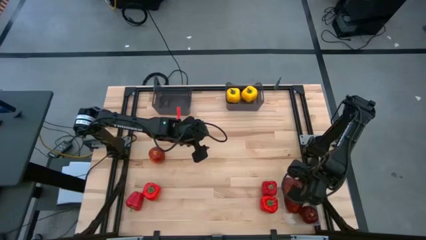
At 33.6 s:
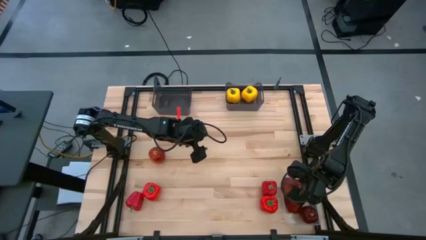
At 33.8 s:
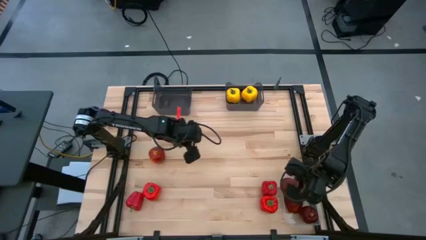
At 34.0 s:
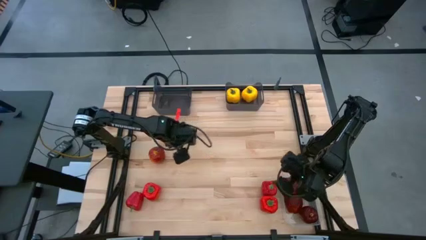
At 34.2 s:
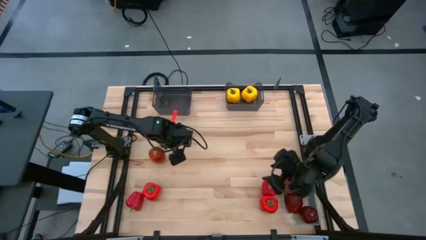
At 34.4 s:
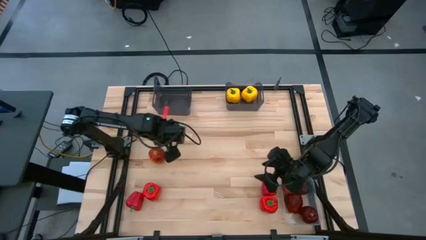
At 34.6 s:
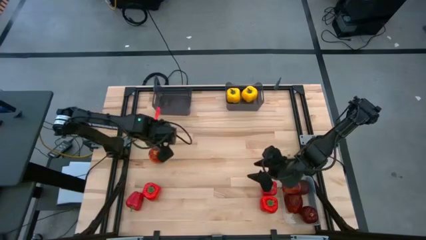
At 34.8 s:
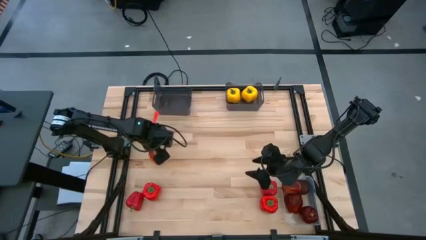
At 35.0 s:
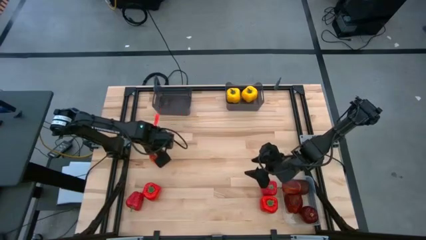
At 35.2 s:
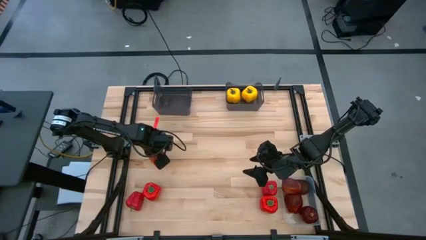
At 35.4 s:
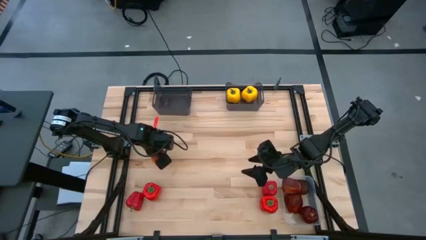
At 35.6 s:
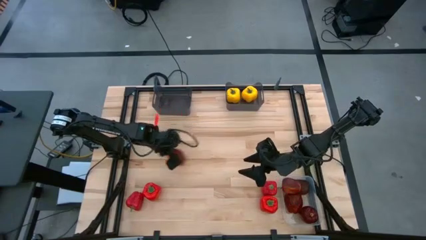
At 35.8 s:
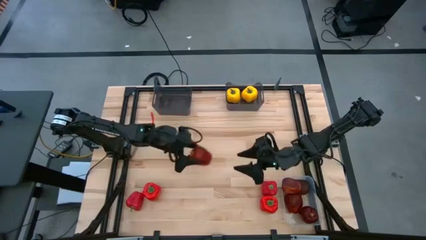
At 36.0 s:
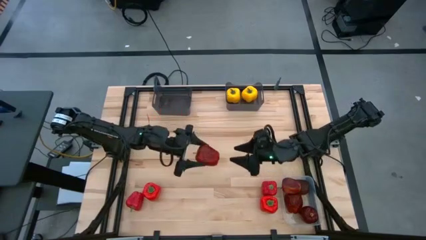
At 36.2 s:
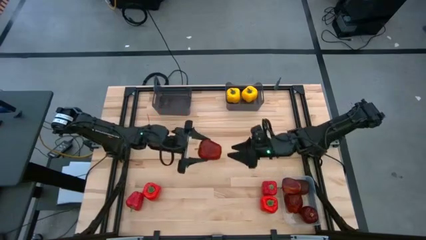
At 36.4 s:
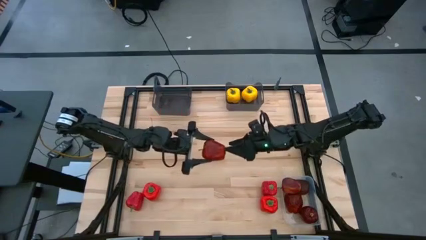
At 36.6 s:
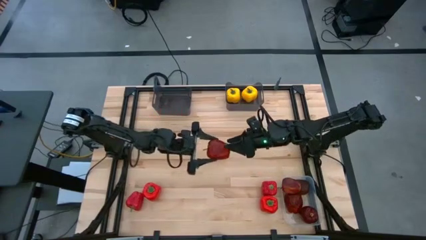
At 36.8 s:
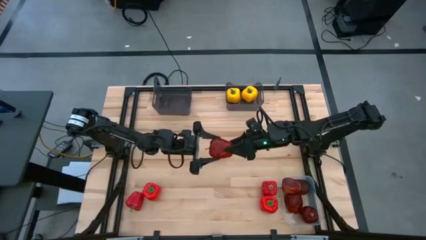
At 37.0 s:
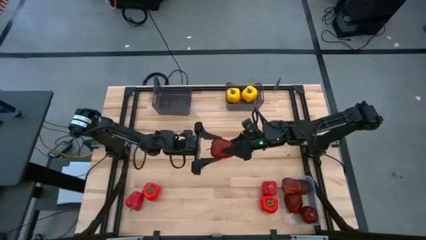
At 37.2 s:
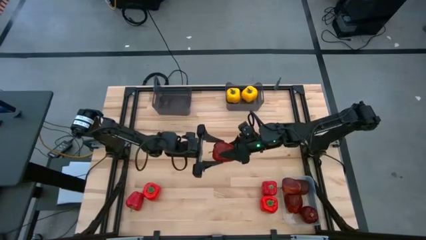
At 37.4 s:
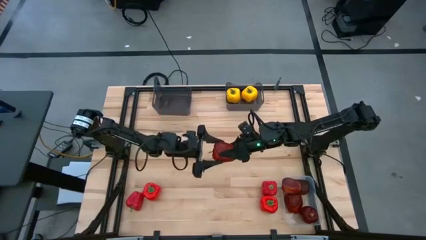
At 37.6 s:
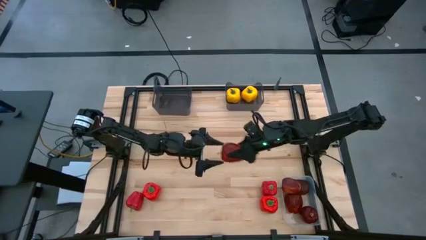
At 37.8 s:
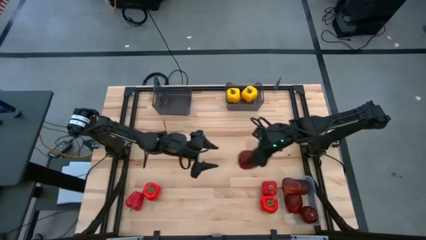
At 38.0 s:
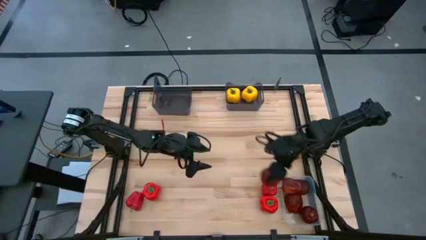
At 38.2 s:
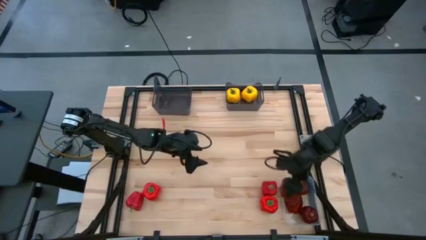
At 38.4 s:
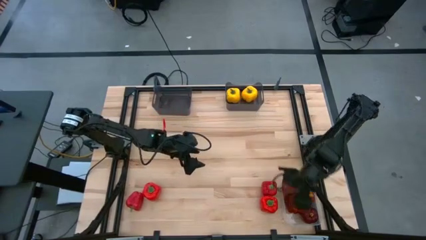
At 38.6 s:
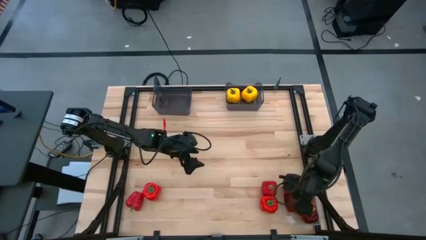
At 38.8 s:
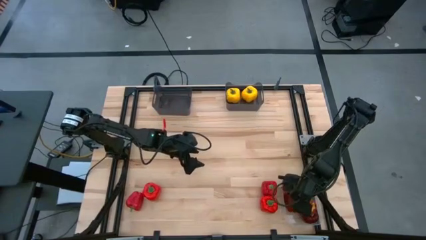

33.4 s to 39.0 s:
Task: Sort produce into baskets
Put the red apple into the transparent bin

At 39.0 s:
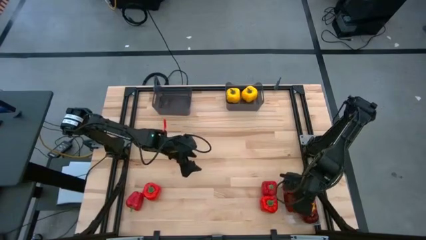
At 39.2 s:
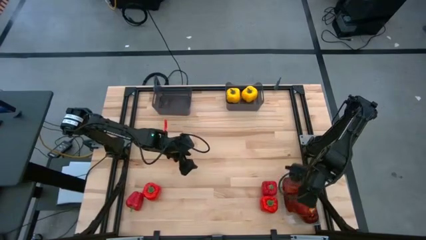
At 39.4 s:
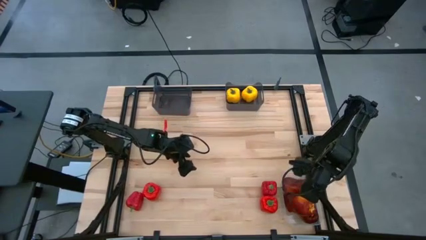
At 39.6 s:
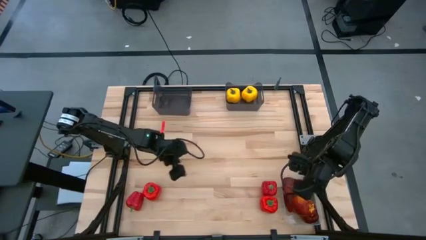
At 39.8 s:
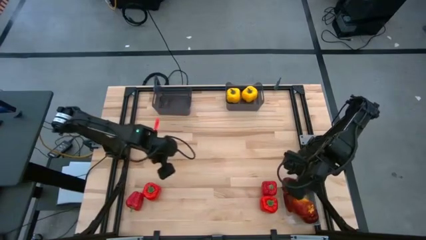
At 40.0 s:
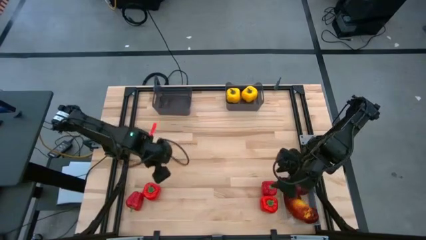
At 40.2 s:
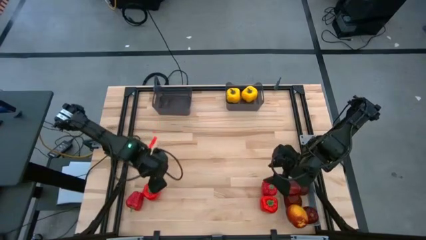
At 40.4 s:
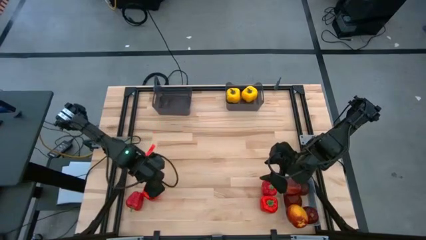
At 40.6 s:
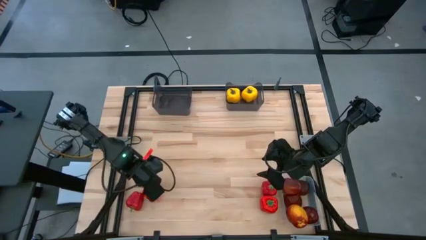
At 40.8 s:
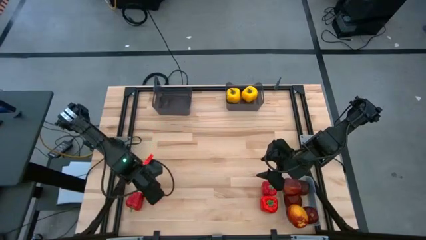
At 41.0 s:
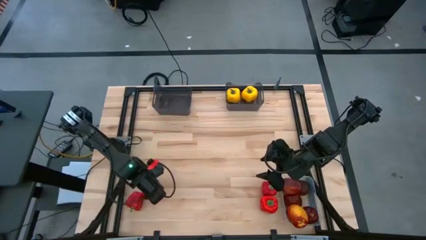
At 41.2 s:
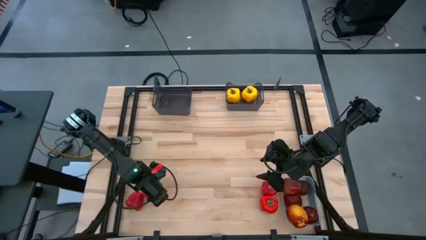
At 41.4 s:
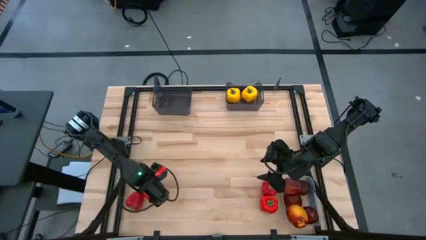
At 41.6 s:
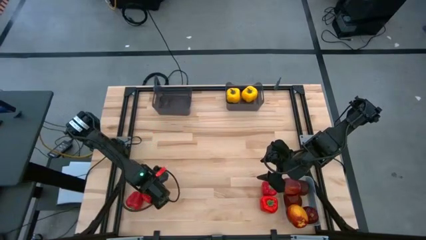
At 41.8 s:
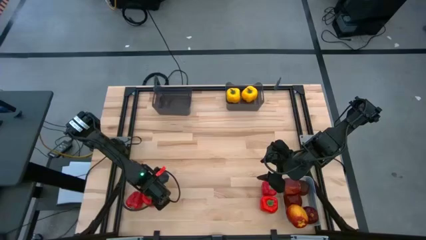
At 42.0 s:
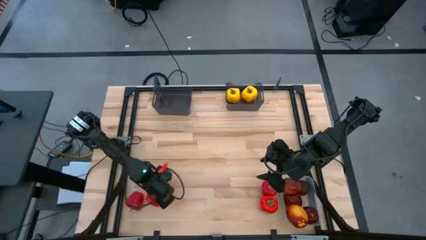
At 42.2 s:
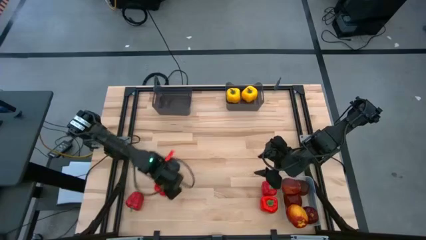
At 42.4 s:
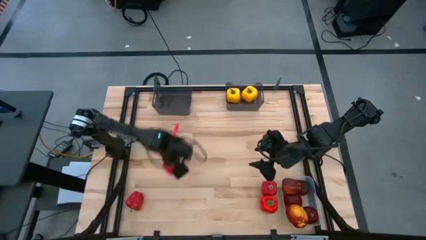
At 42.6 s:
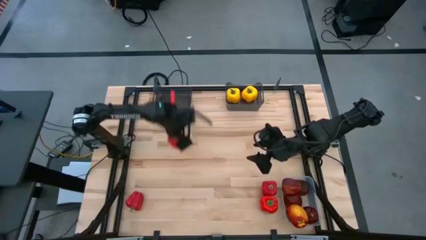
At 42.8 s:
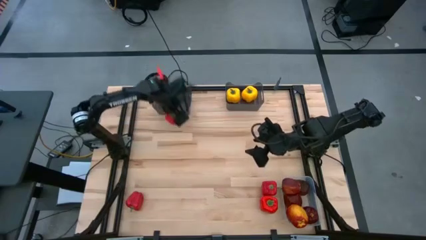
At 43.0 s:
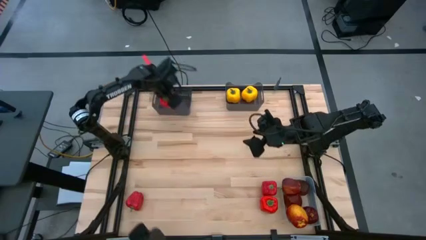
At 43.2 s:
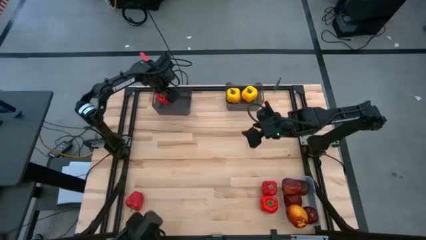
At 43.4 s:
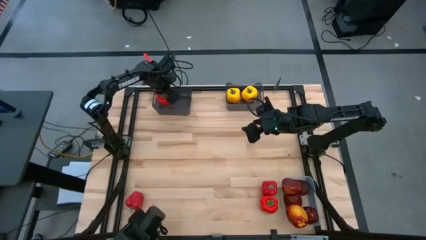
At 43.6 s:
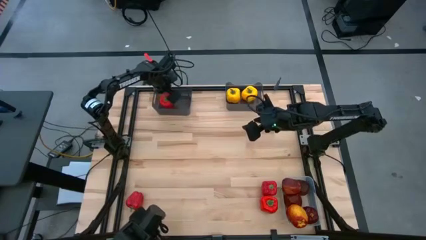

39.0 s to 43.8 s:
Put the red bell pepper into the left black bin

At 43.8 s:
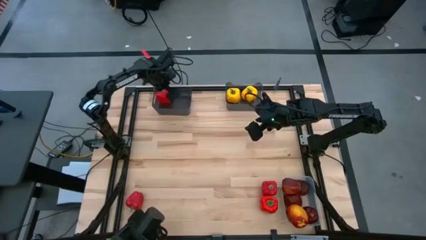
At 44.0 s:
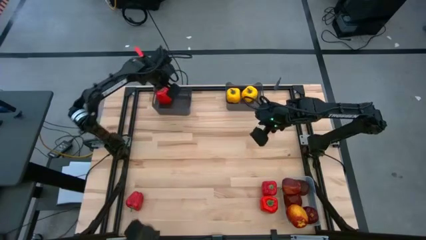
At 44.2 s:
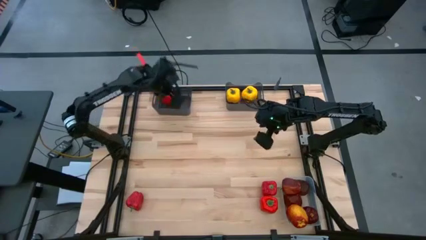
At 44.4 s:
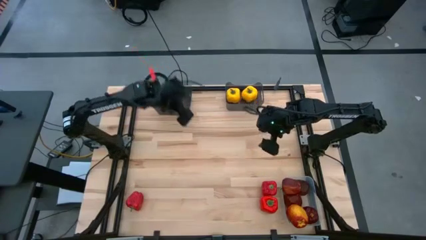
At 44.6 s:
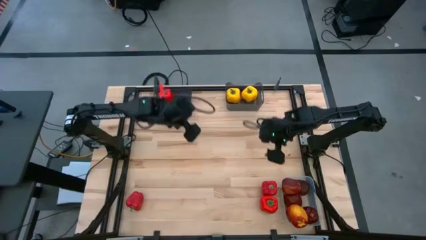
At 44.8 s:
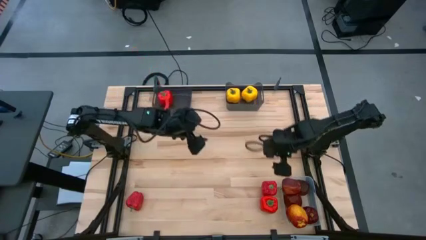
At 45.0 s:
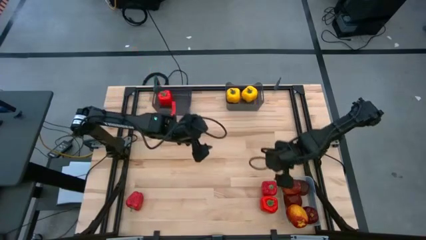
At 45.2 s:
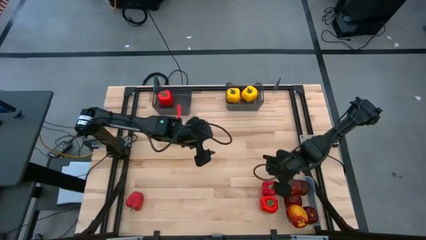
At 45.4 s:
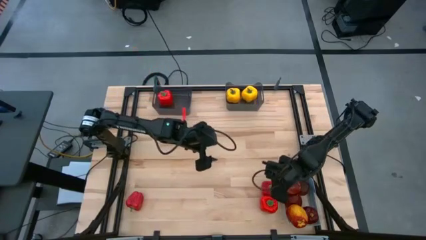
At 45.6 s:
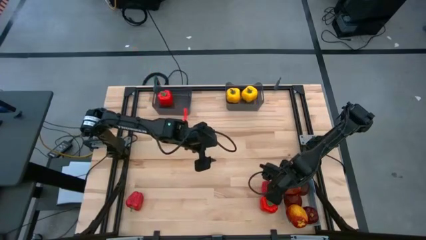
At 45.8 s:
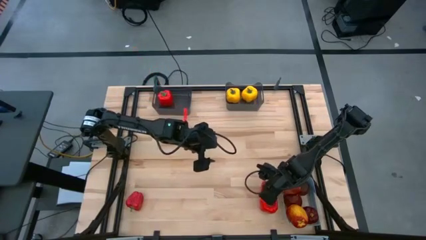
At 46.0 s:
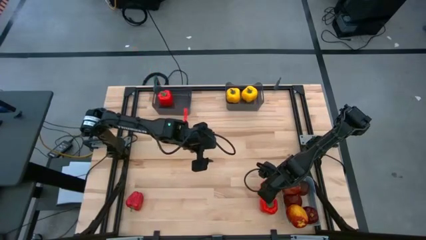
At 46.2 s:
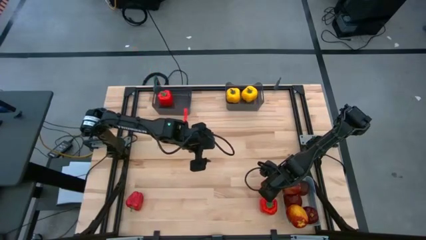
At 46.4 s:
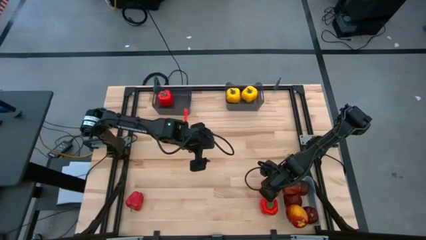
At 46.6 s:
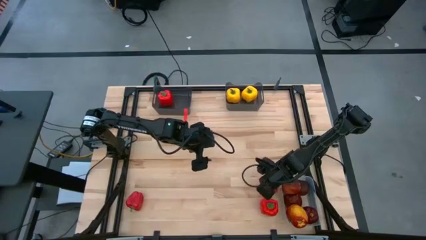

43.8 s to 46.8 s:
Put the red bell pepper into the left black bin

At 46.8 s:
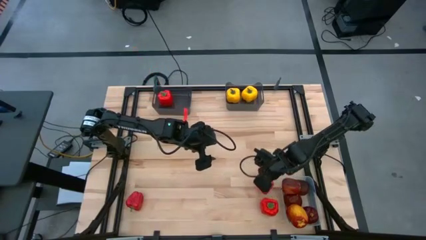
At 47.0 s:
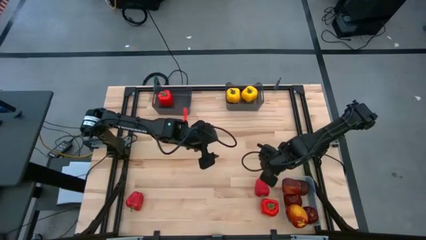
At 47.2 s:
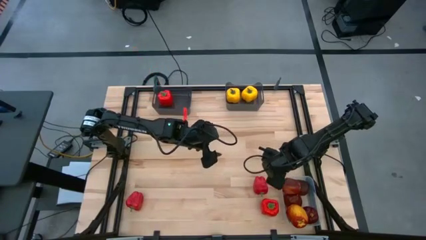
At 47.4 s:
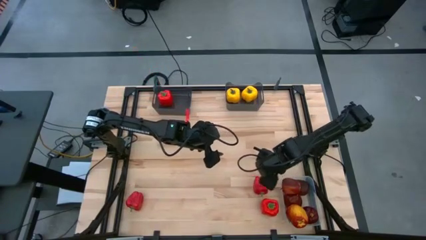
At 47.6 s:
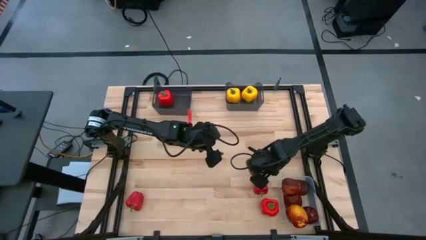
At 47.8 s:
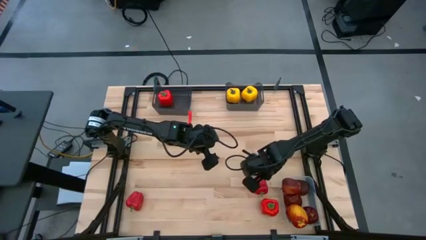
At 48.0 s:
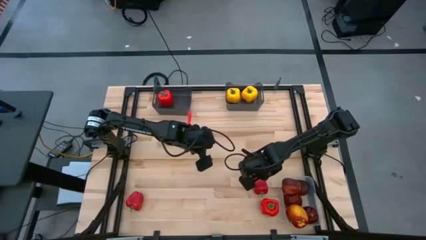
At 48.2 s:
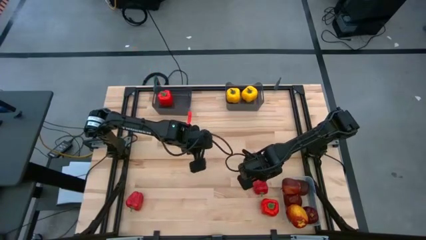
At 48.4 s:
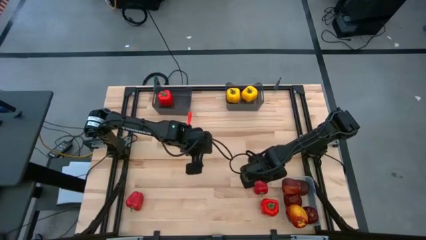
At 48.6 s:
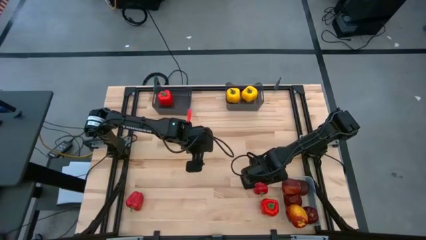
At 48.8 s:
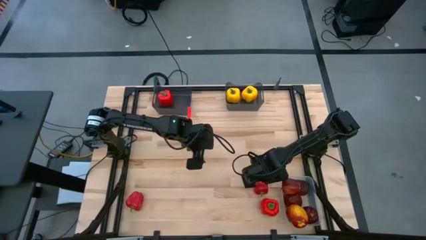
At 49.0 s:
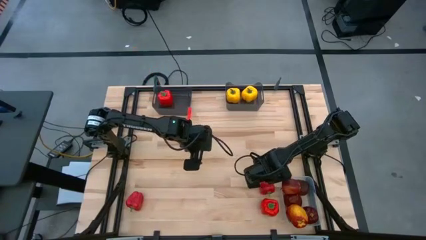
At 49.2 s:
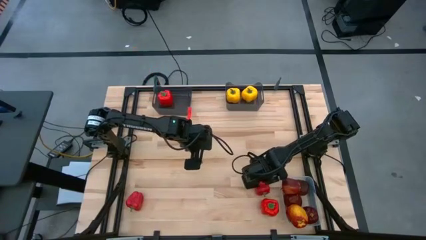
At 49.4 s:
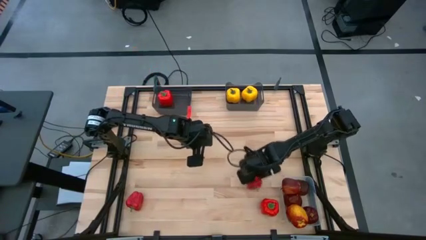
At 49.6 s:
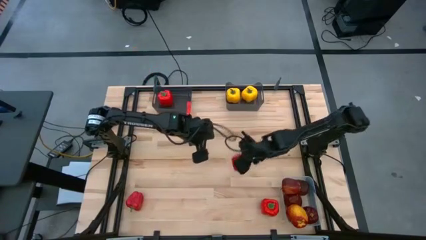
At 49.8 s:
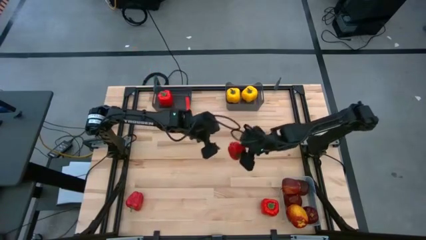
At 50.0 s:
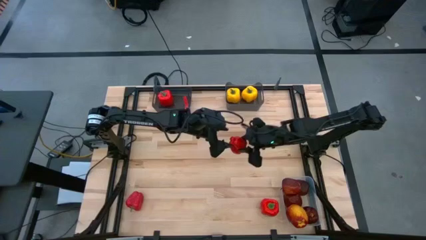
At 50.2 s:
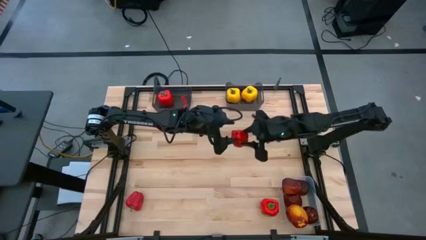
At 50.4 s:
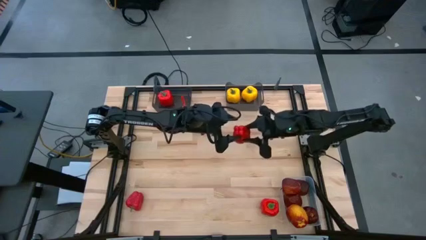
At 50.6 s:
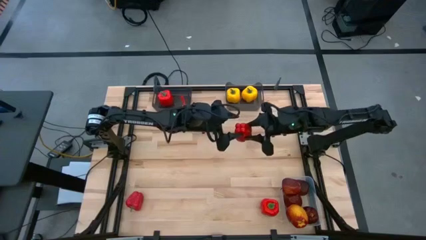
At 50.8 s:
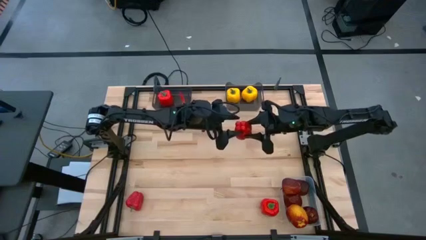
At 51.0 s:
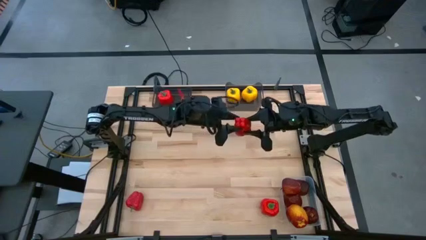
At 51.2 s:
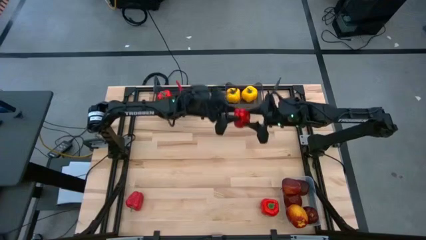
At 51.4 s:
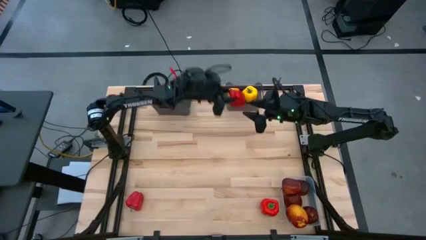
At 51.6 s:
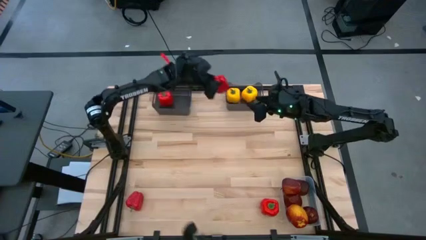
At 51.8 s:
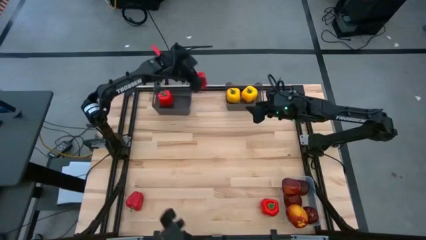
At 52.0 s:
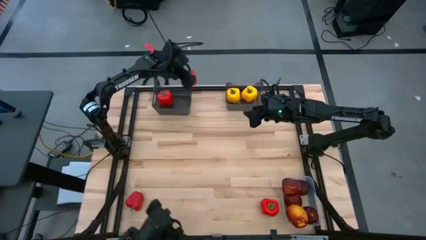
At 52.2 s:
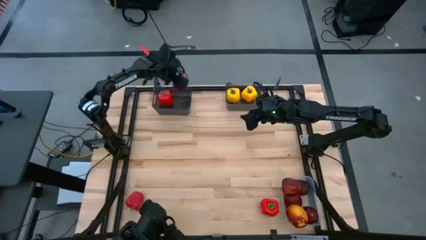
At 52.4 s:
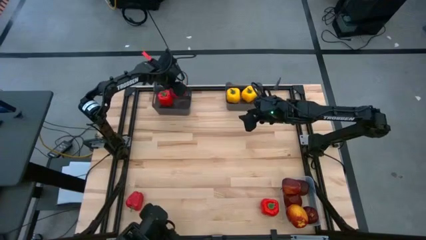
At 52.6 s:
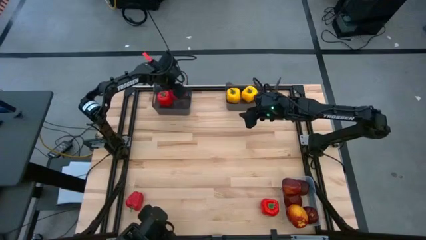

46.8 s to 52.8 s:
Put the red bell pepper into the left black bin
